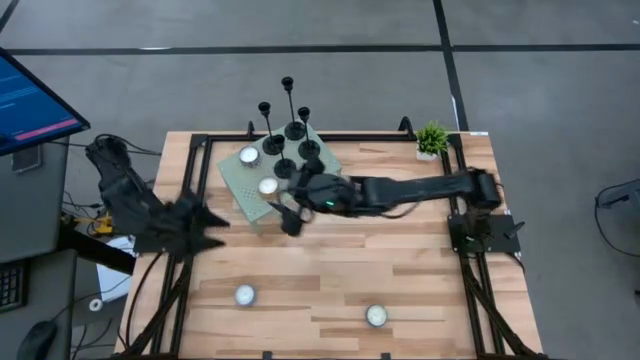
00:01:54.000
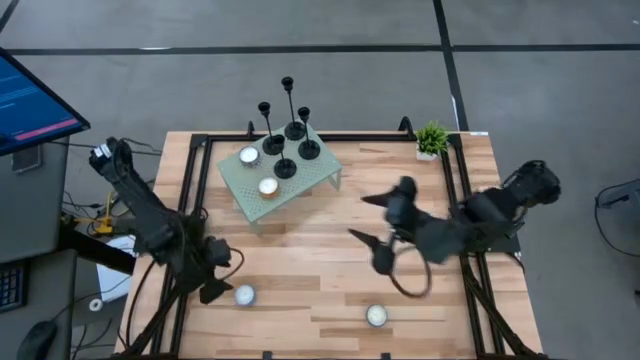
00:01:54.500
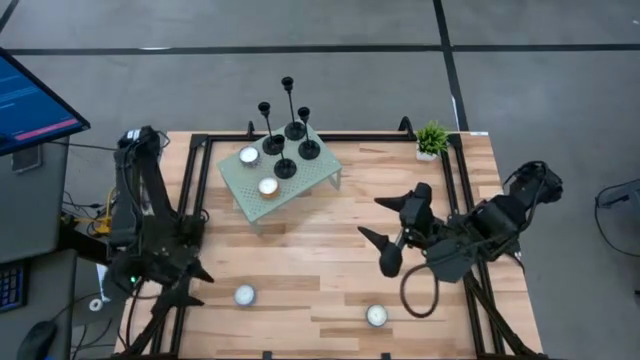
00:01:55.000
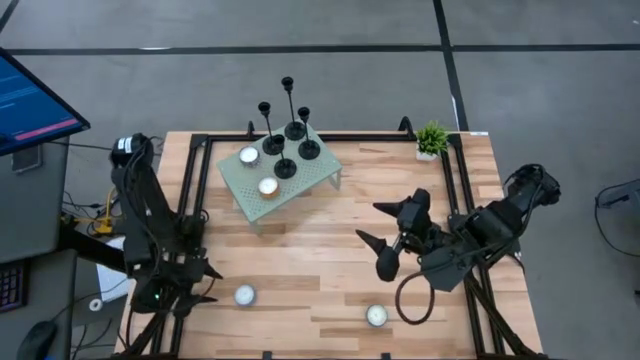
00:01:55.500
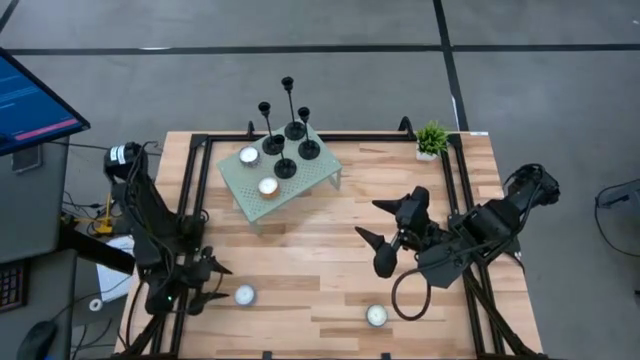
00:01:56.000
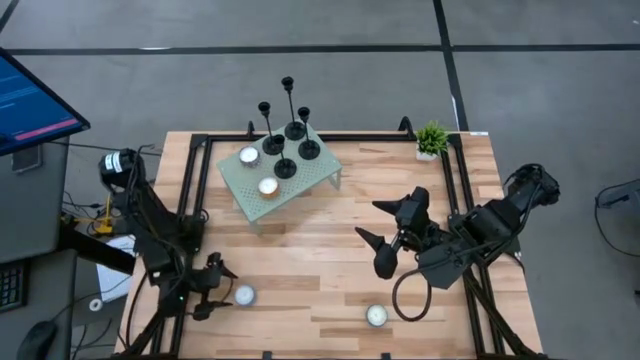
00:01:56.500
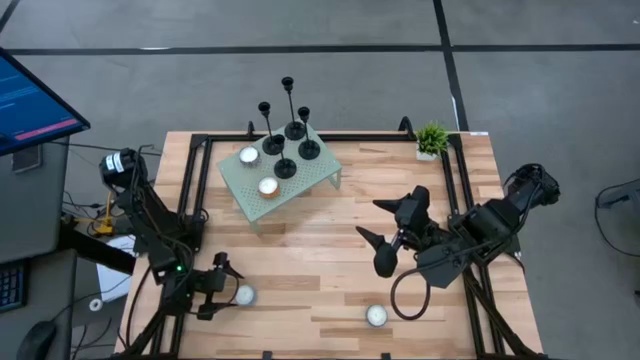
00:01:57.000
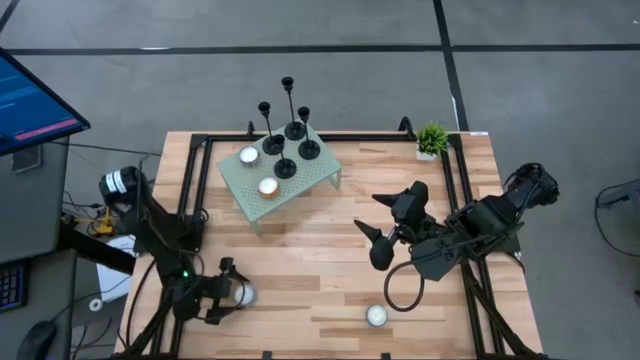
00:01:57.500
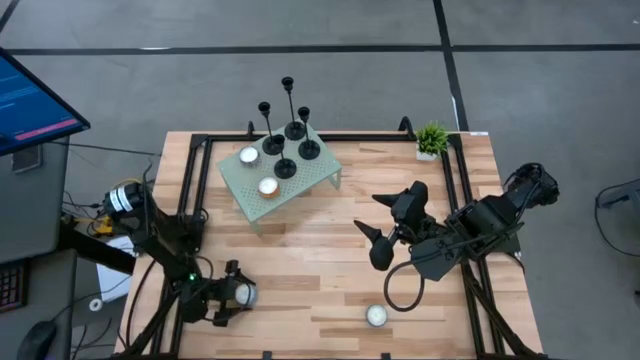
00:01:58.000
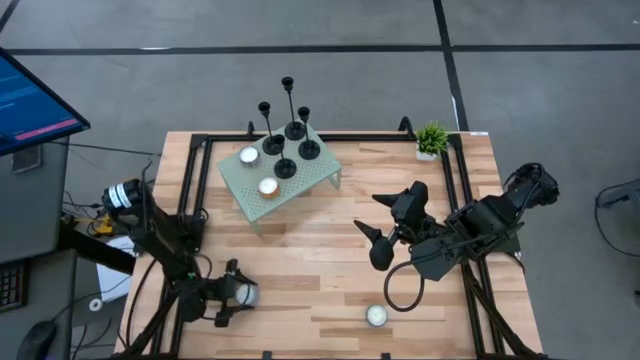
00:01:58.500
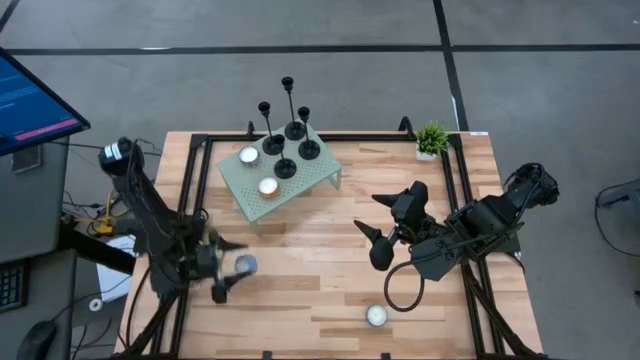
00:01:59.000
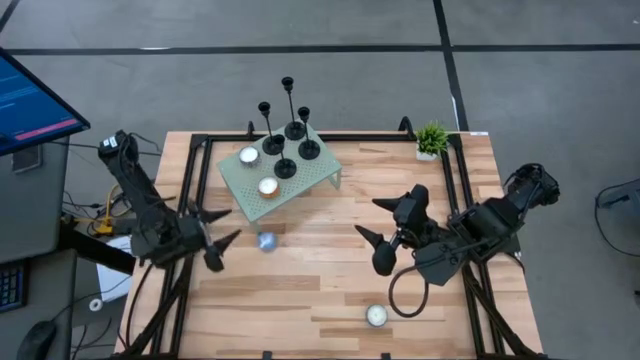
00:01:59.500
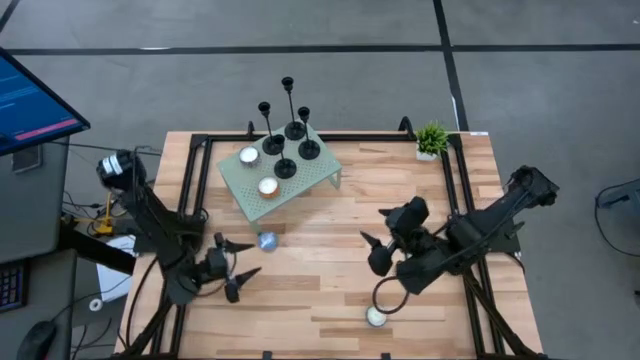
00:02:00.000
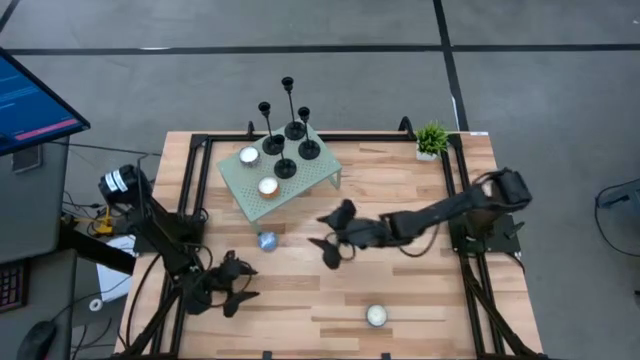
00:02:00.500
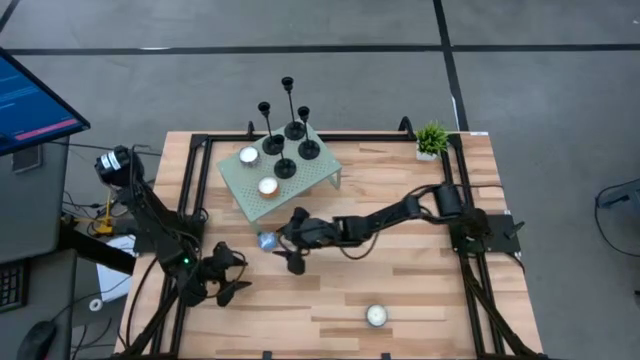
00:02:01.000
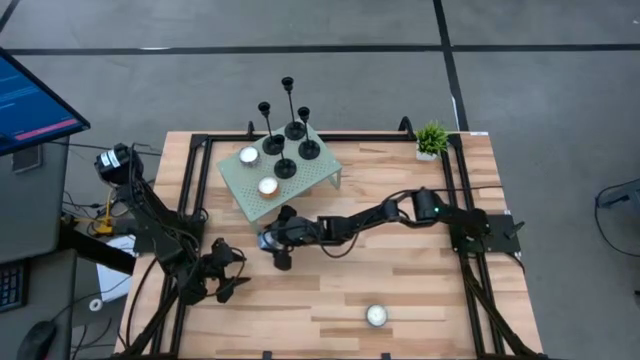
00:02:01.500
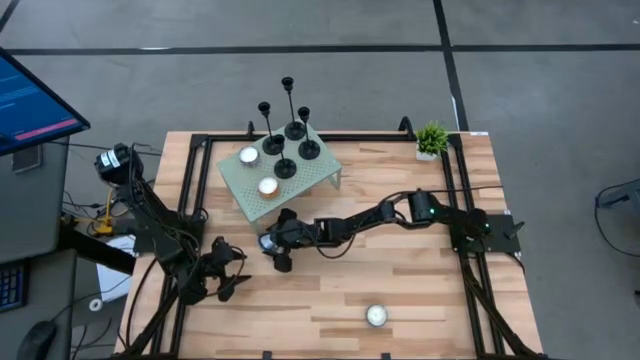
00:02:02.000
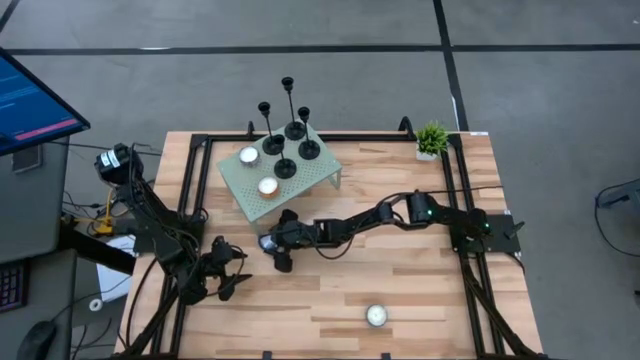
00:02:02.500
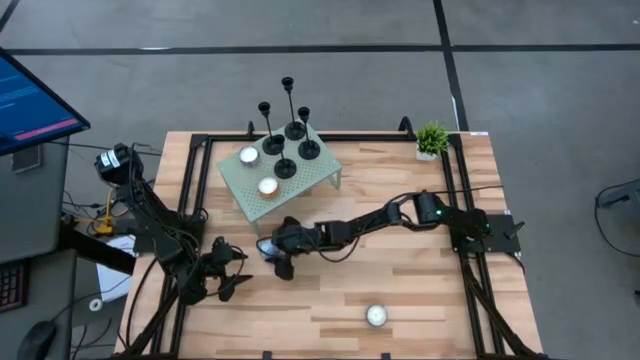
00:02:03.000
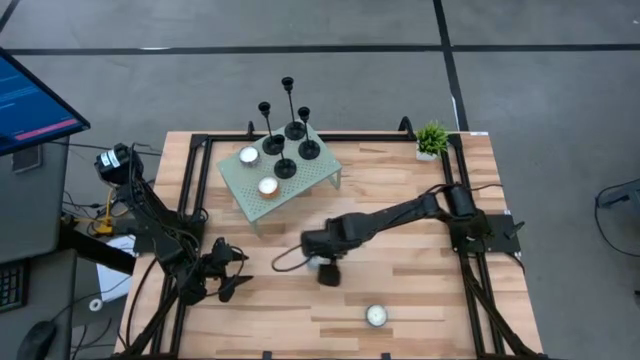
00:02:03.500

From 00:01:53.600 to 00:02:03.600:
Task: Pick & Place candle stick holders
Put the light blue patterned scented candle on the shelf

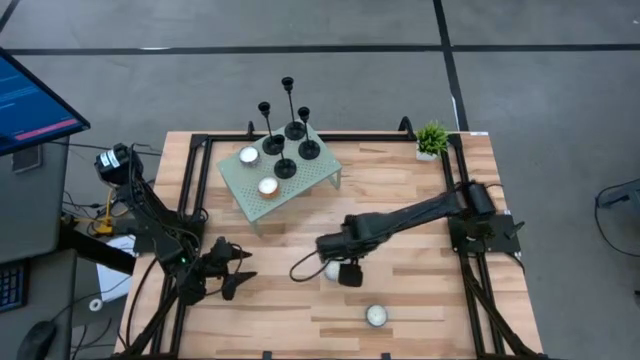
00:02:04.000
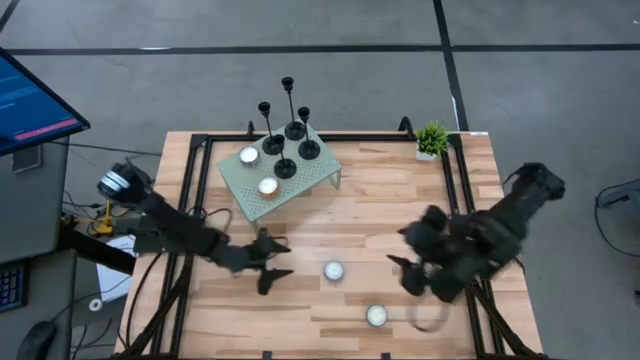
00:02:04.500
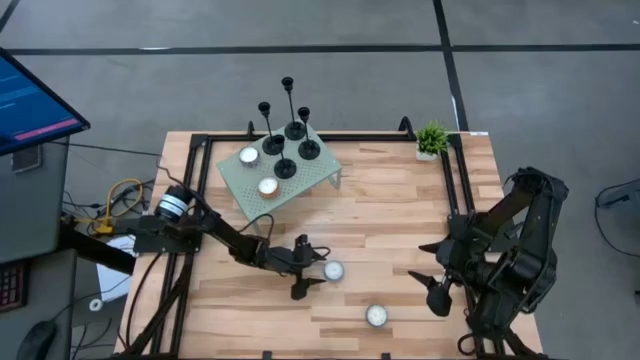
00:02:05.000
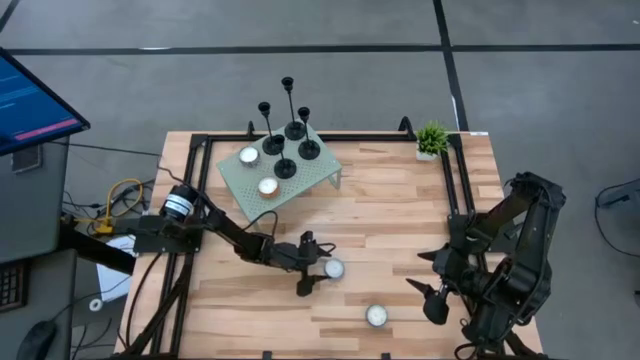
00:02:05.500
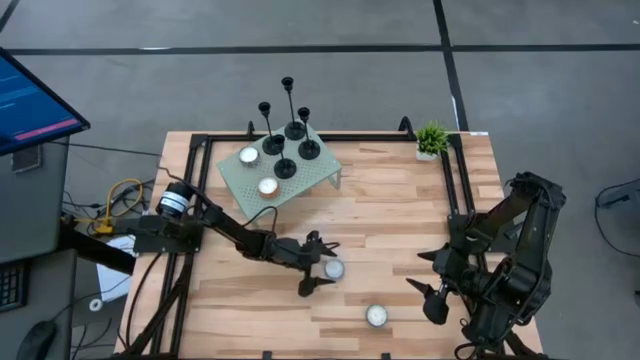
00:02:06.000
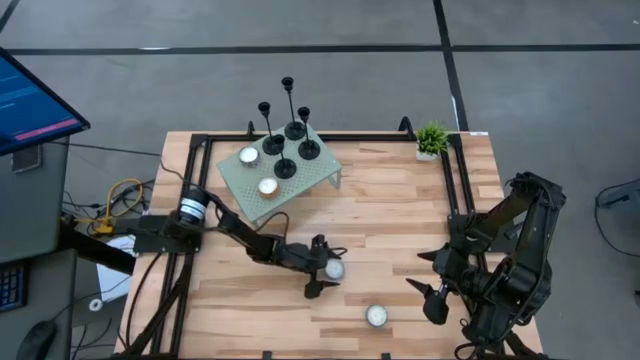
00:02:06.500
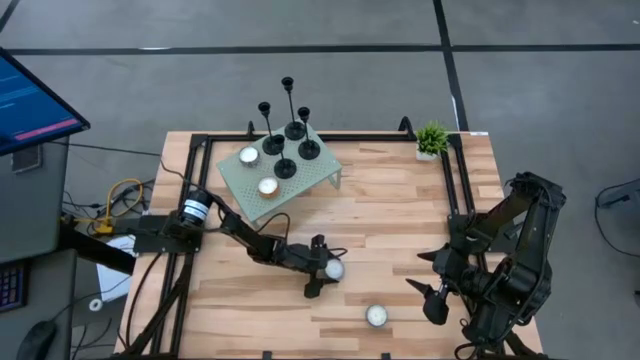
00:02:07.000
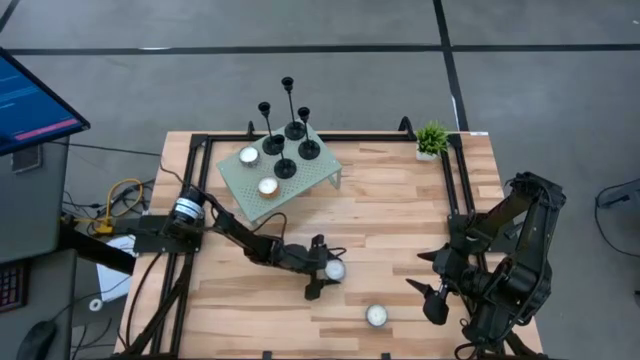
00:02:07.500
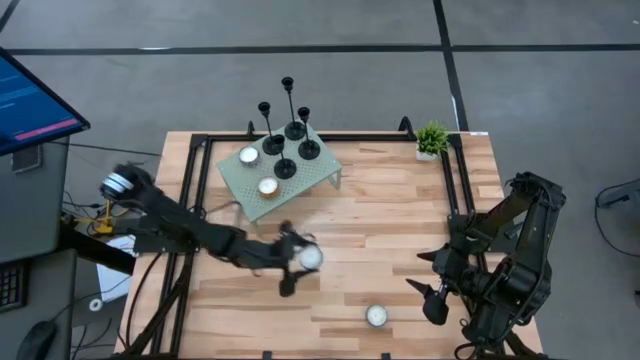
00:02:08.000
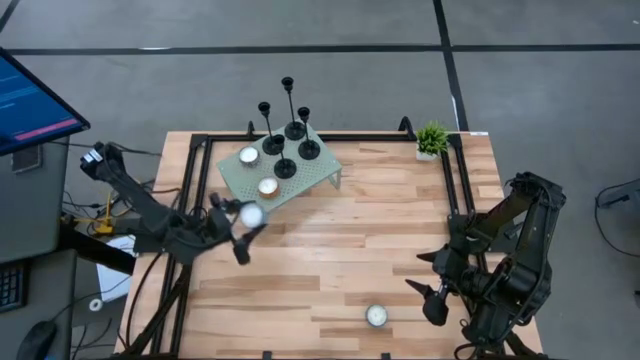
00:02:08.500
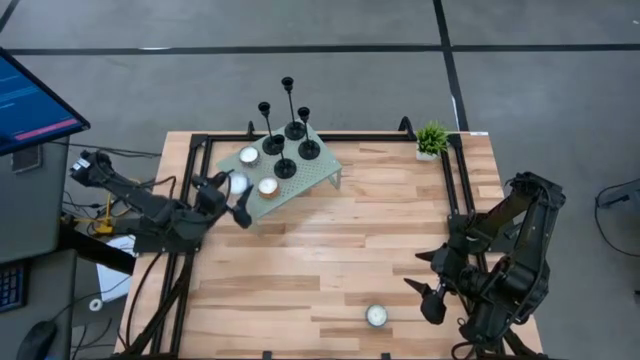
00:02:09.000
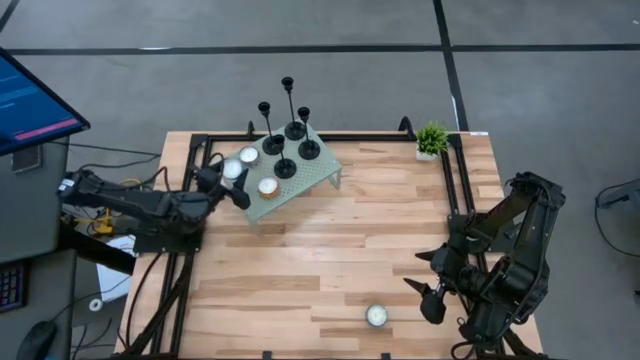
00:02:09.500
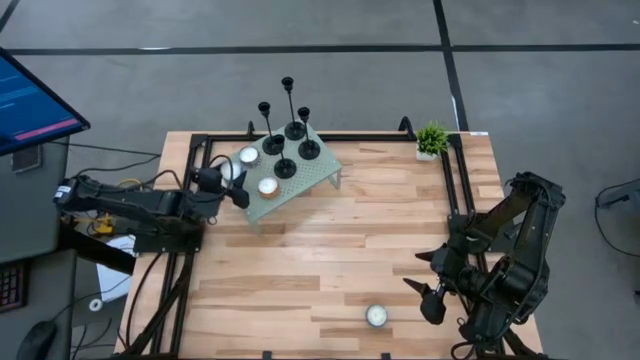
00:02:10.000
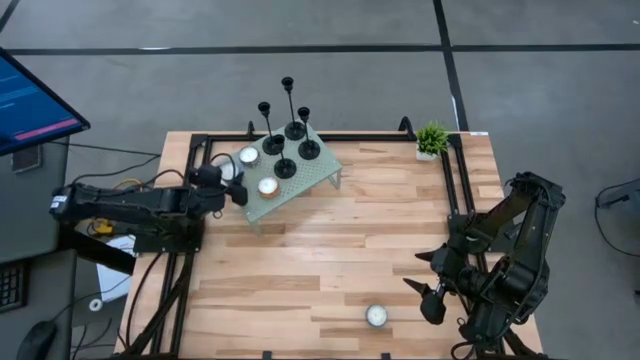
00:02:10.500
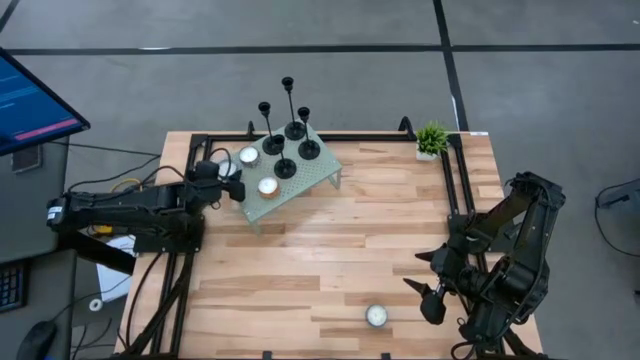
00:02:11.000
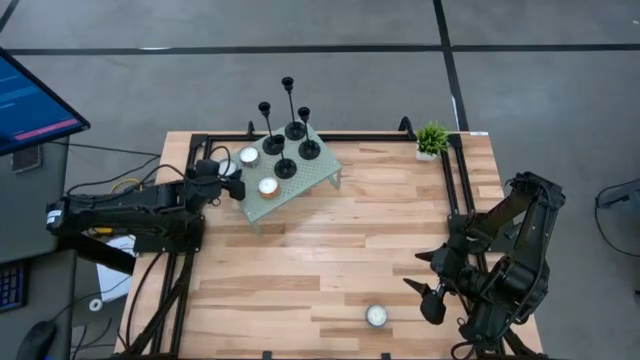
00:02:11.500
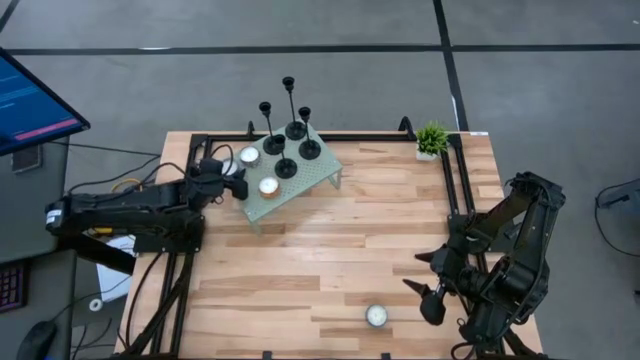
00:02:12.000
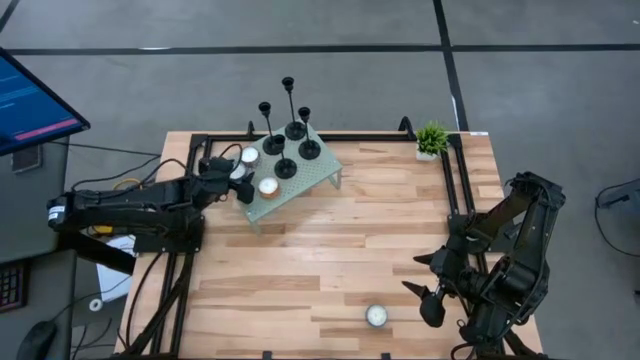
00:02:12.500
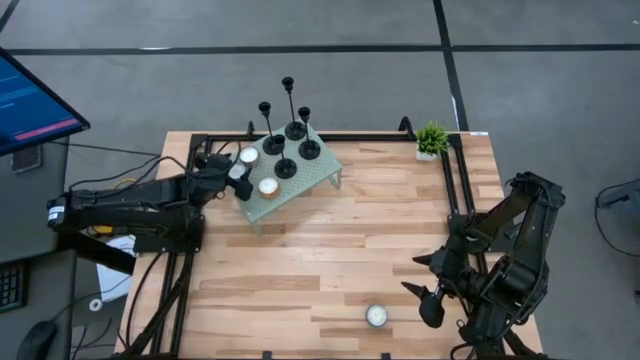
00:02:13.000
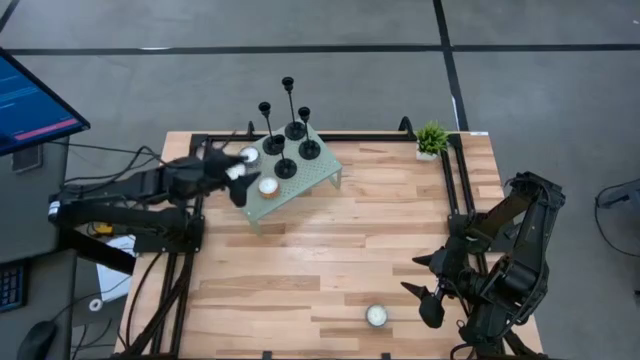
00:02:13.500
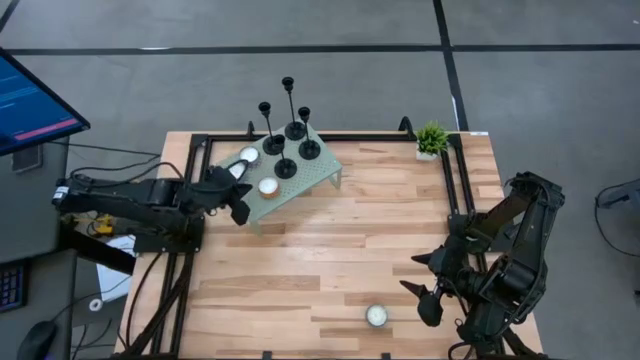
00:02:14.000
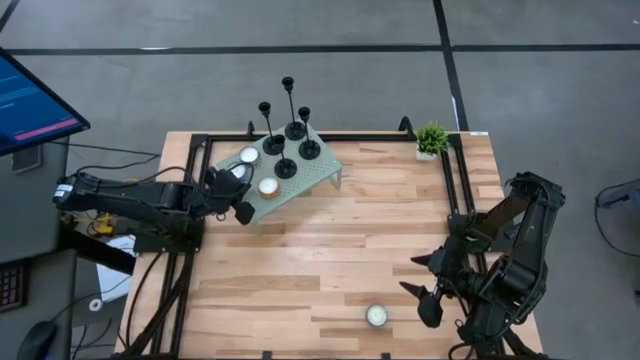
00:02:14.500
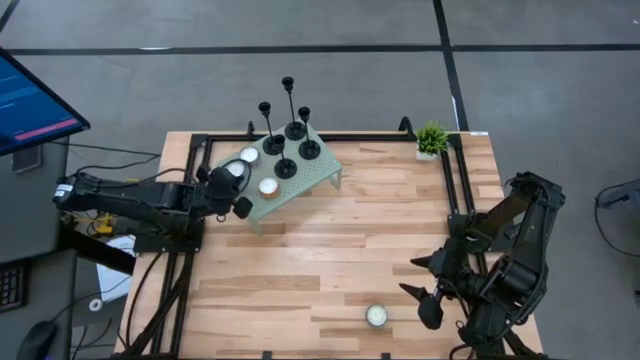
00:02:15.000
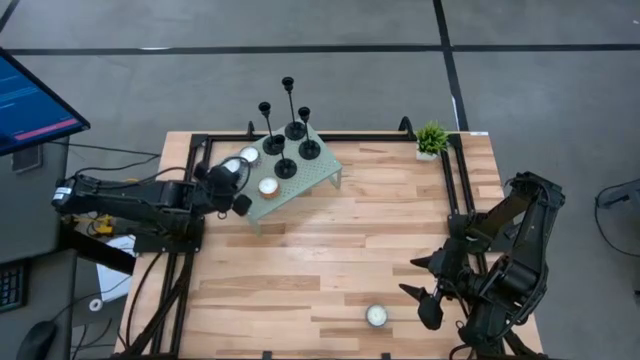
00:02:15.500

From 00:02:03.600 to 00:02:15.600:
Put the light blue patterned scented candle on the shelf
